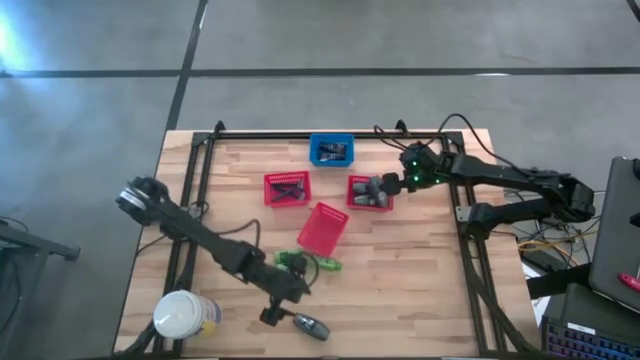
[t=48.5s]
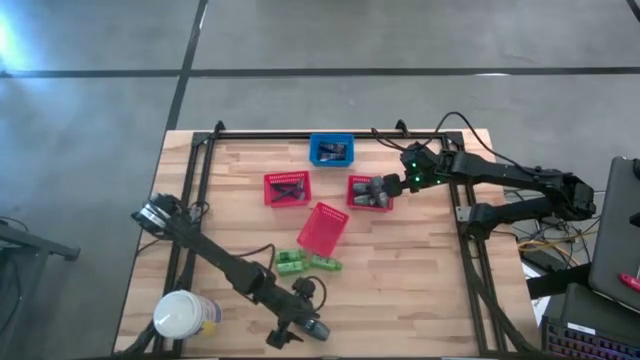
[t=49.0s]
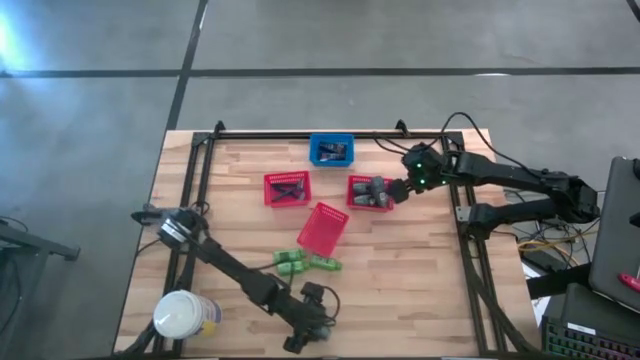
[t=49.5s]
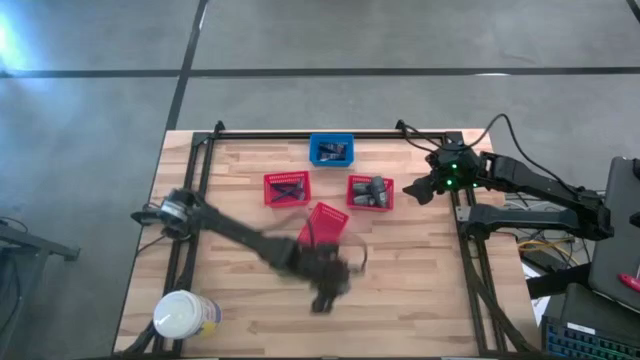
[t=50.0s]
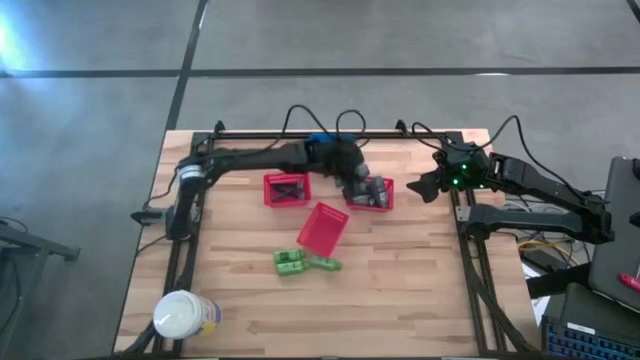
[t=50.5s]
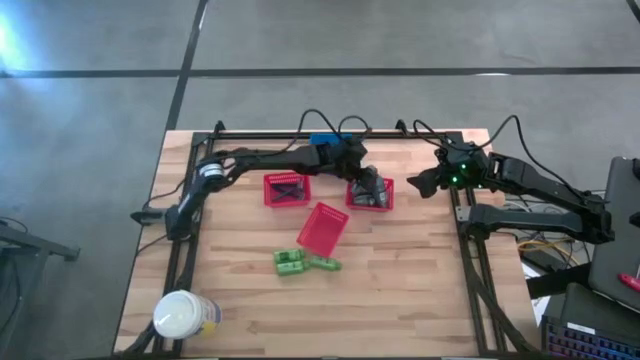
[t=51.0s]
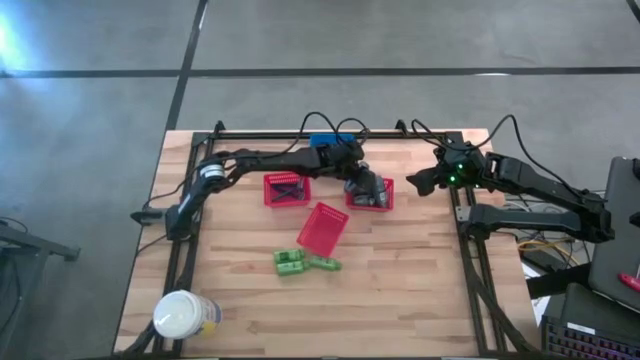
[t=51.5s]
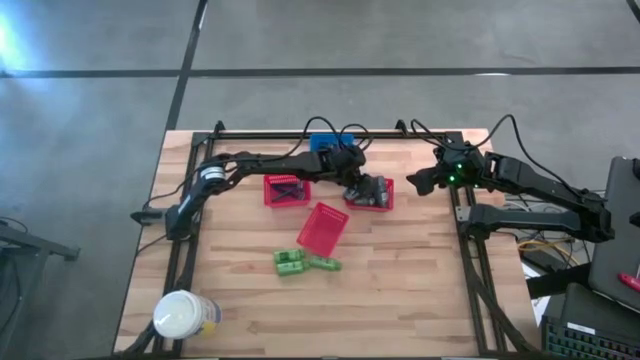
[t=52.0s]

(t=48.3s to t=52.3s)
Task: Pick & Place Travel size toiletries
Put the black deodorant into the top right red bin

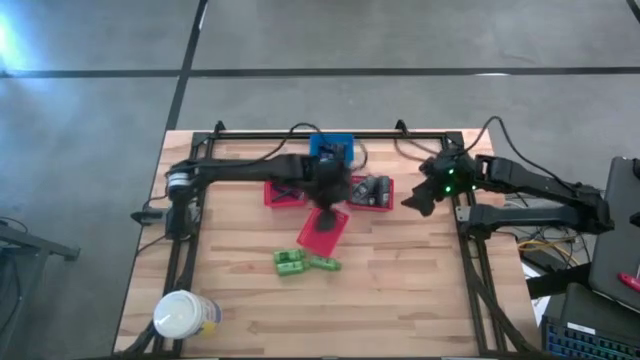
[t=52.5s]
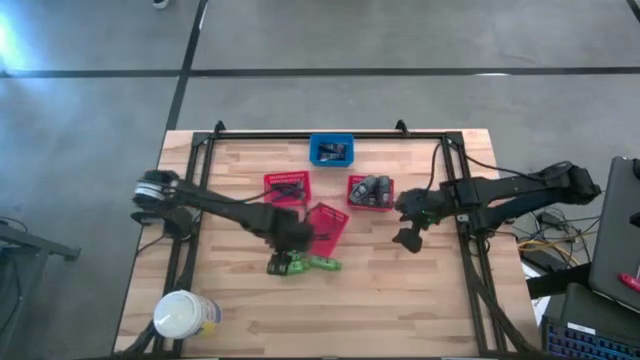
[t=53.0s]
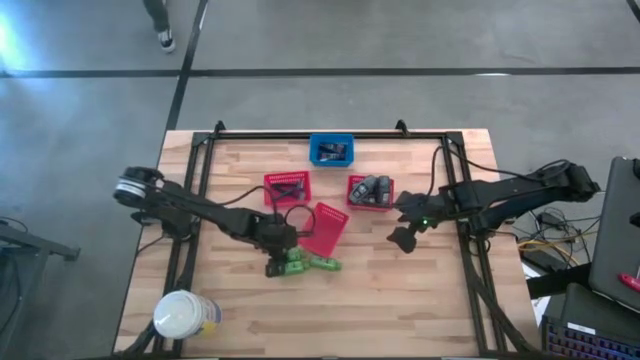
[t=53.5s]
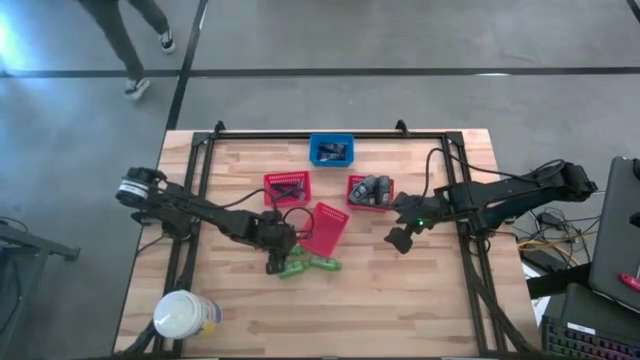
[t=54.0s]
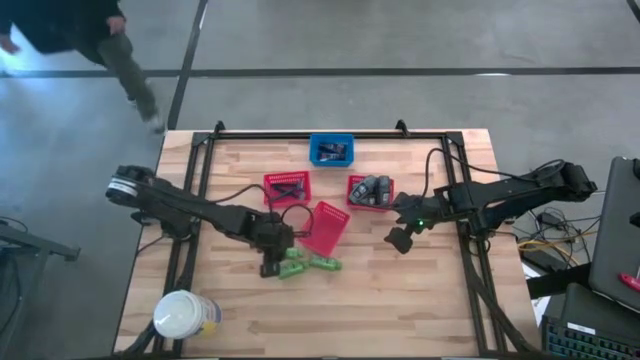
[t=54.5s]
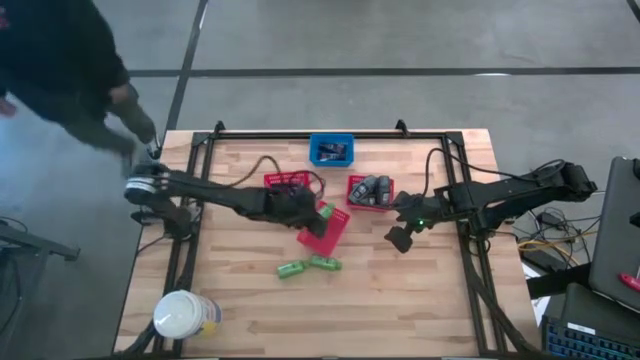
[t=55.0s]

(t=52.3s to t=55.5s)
Put the green shampoo into the bottom red bin

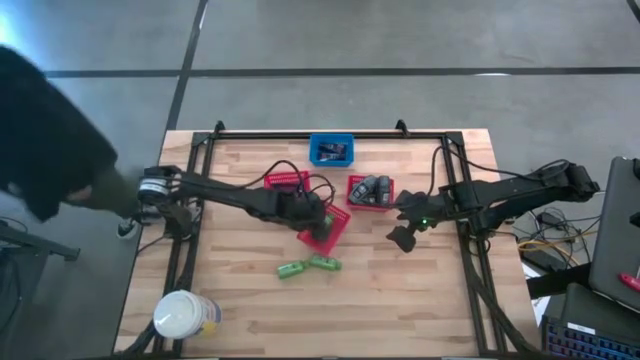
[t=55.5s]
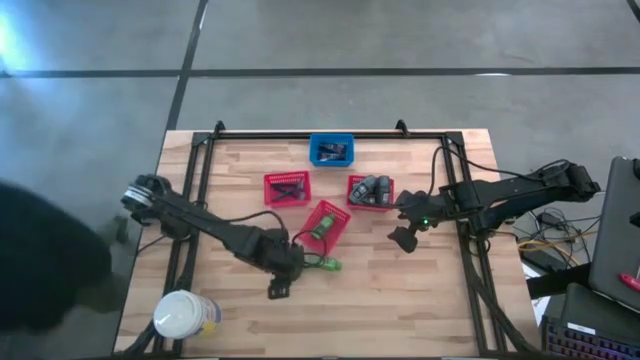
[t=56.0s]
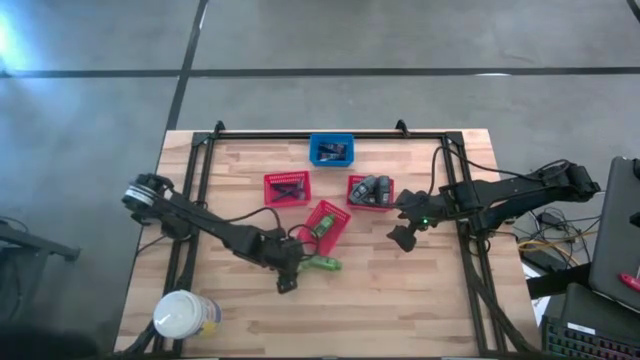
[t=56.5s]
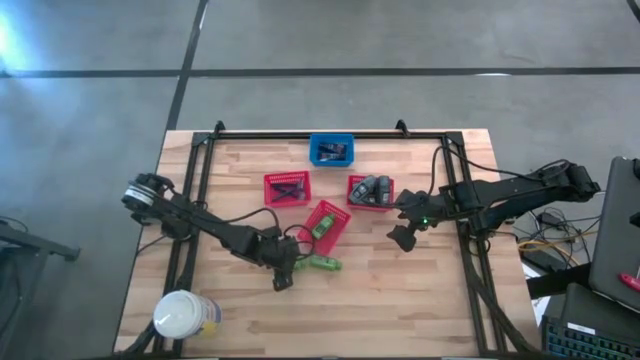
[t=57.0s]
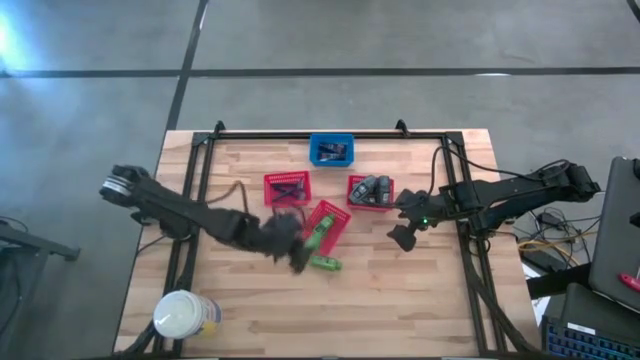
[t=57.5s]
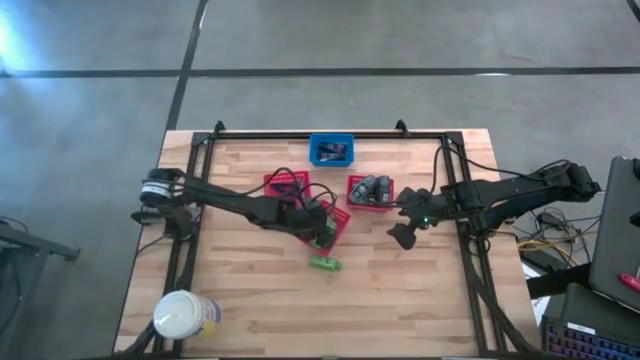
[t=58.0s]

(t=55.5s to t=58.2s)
Put the green shampoo into the bottom red bin

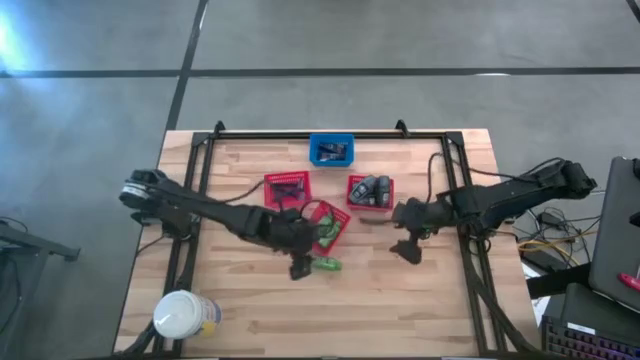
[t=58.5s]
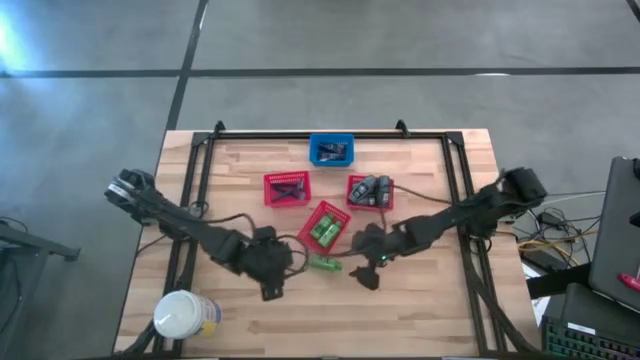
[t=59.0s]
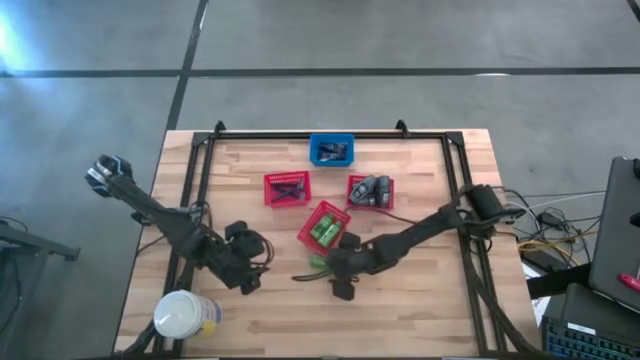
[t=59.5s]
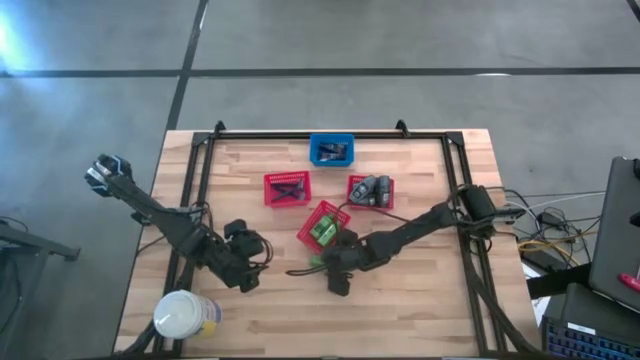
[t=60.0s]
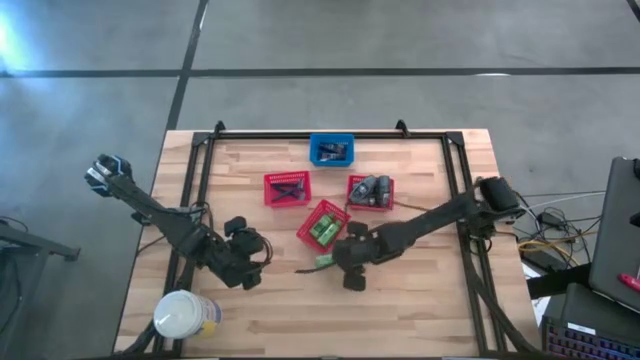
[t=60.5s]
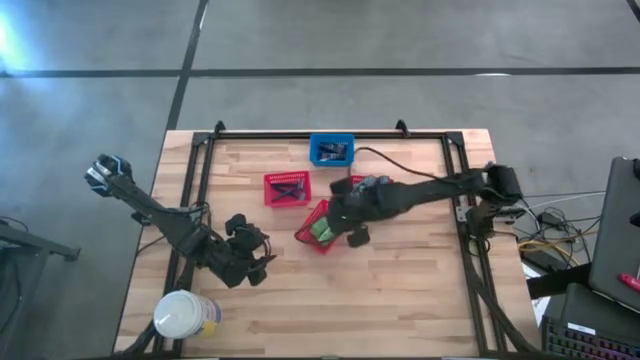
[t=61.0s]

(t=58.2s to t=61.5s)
Put the green shampoo into the bottom red bin

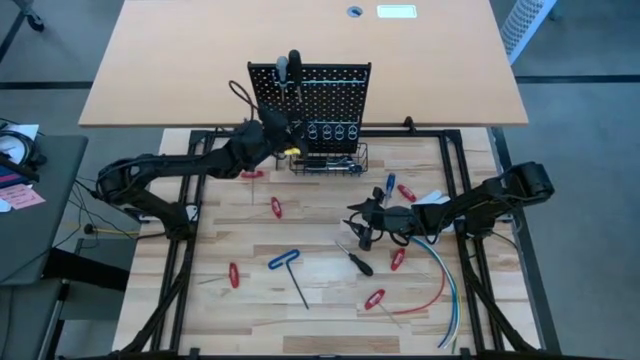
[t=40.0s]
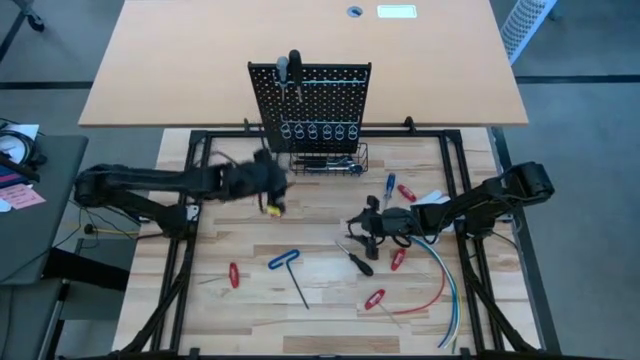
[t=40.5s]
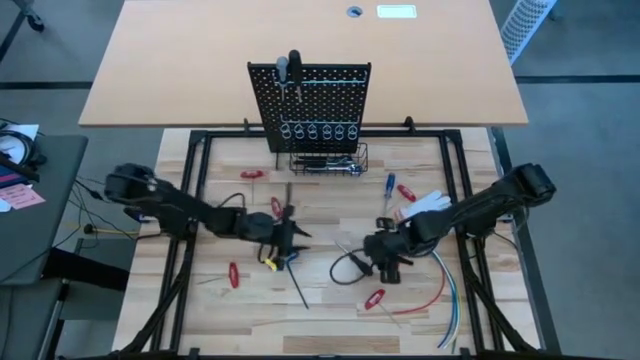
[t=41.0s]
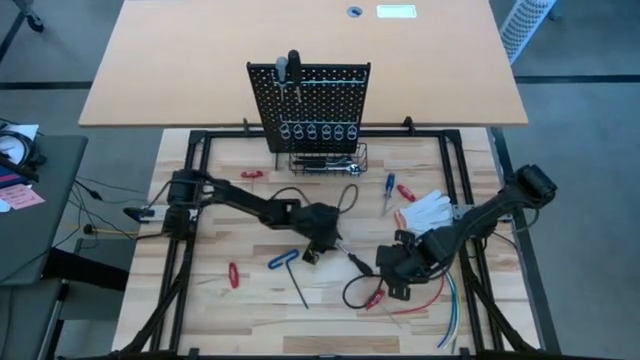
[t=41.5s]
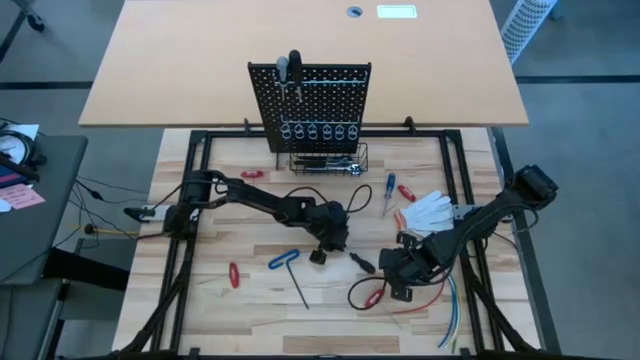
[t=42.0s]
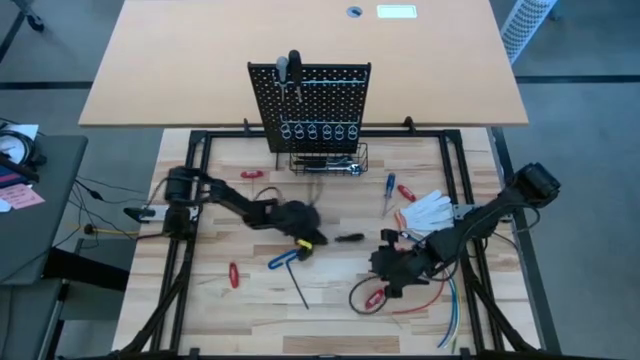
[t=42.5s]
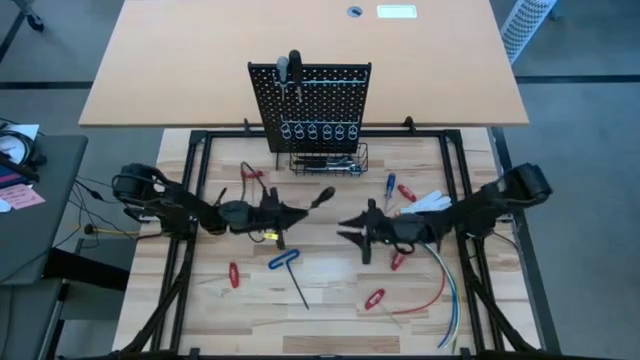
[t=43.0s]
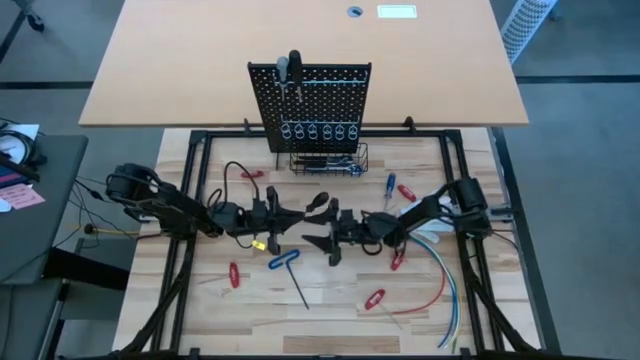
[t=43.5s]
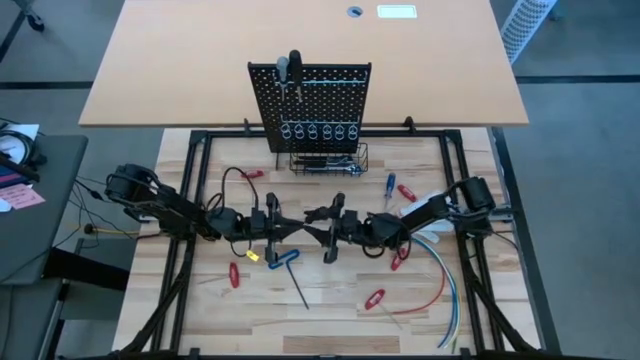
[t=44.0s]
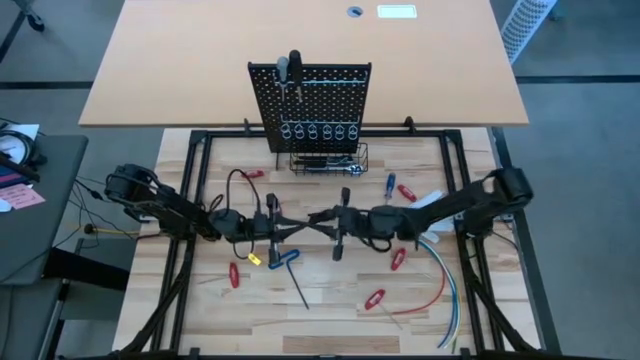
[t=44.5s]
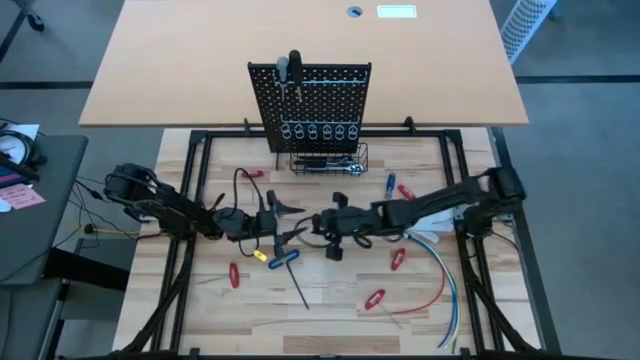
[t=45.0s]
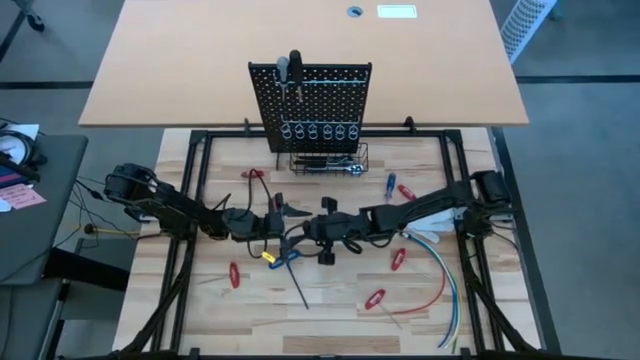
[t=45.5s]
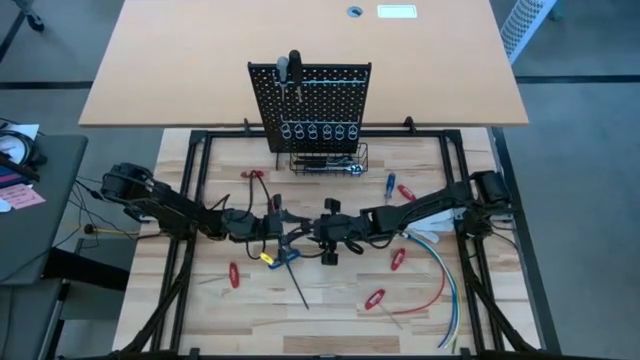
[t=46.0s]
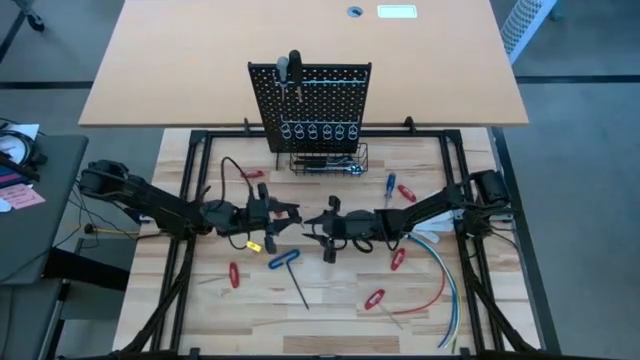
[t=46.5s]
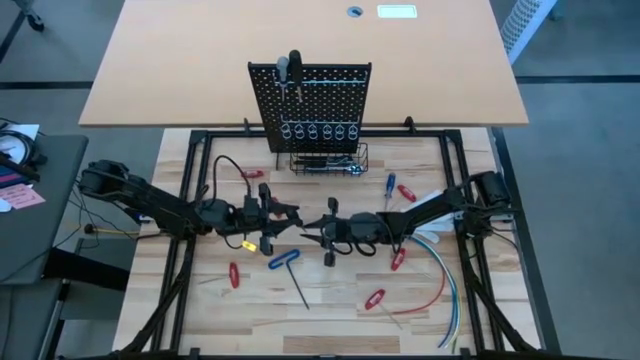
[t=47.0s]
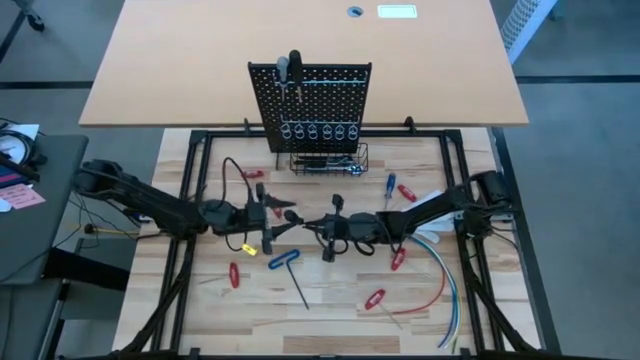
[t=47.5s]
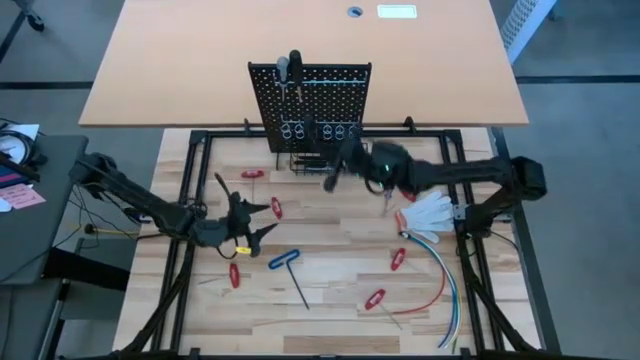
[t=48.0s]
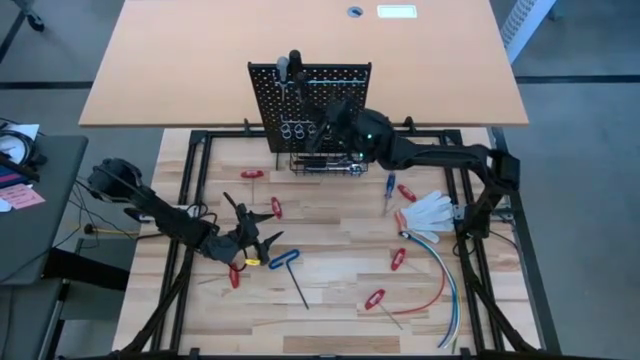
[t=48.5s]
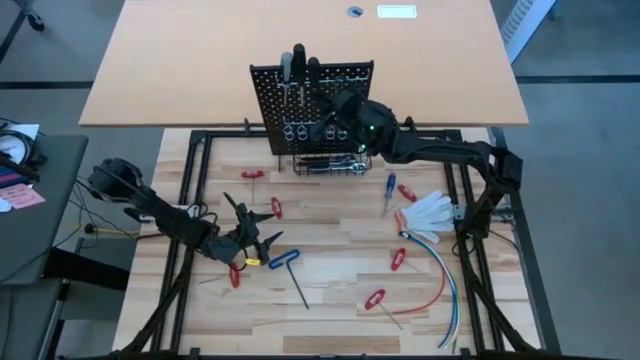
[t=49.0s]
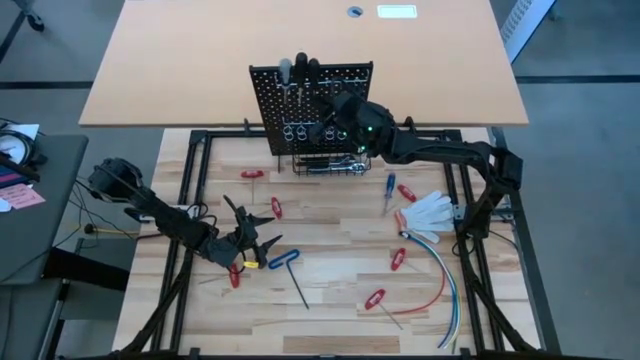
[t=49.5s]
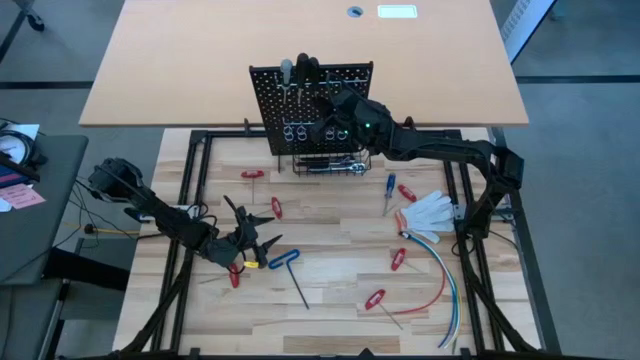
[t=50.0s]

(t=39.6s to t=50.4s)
Task: Hang tools onto peg board
Hang the black screwdriver on the pegboard
